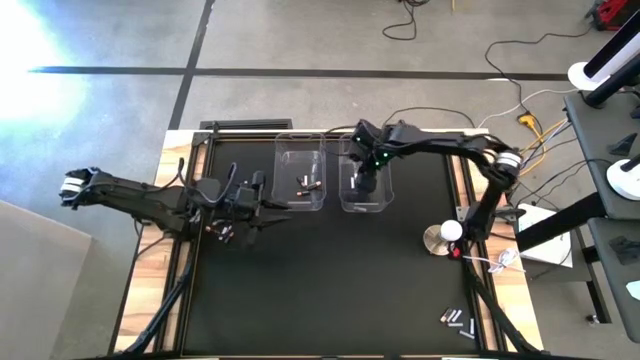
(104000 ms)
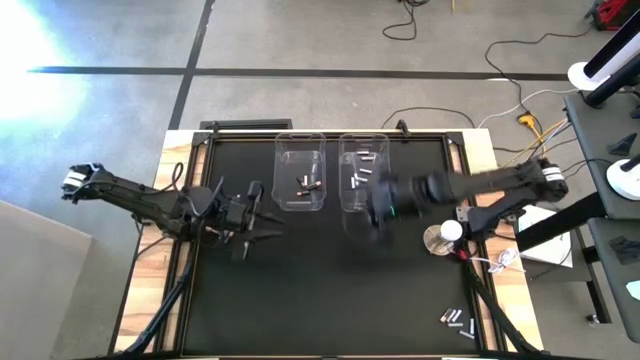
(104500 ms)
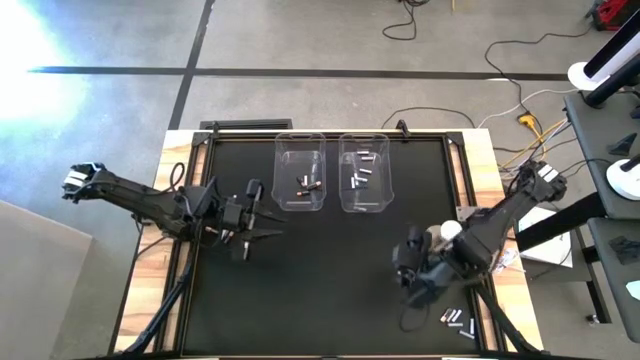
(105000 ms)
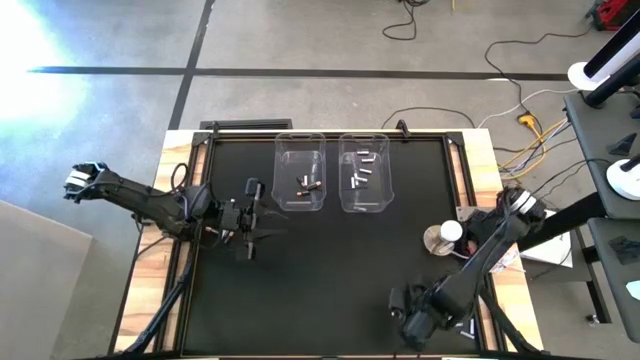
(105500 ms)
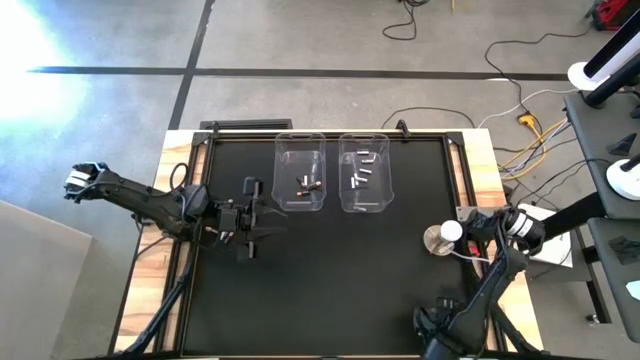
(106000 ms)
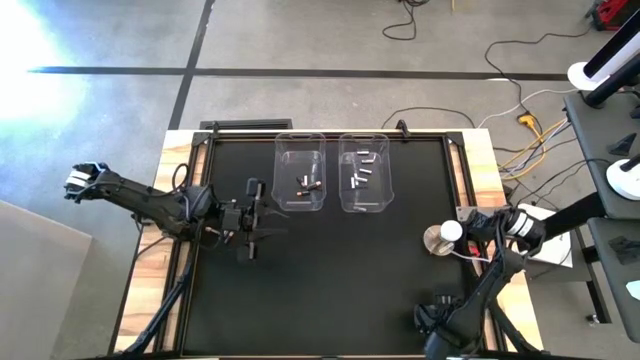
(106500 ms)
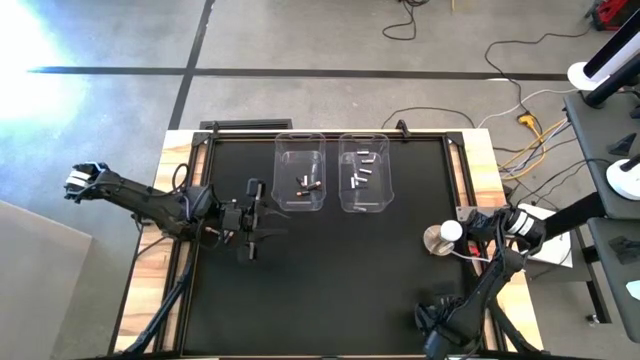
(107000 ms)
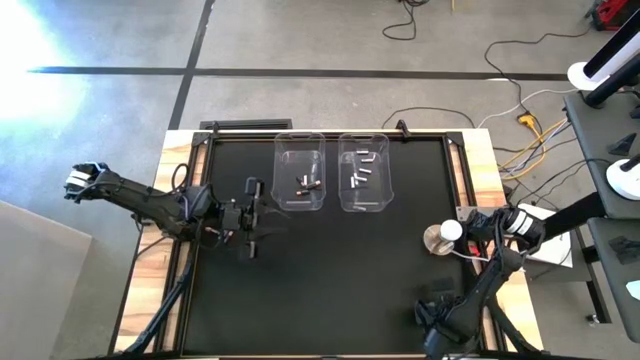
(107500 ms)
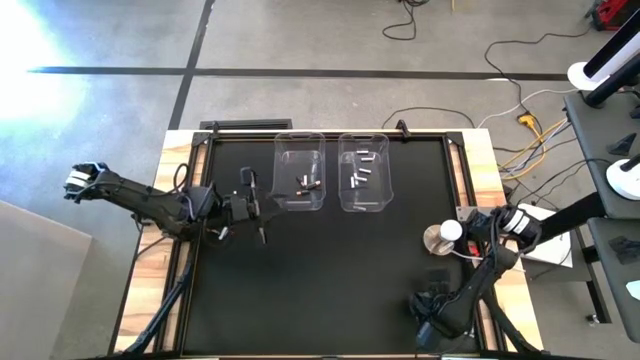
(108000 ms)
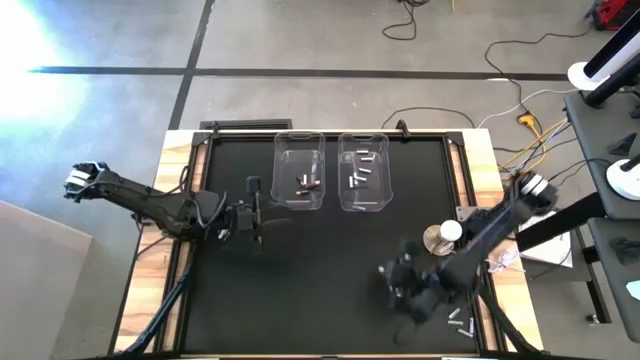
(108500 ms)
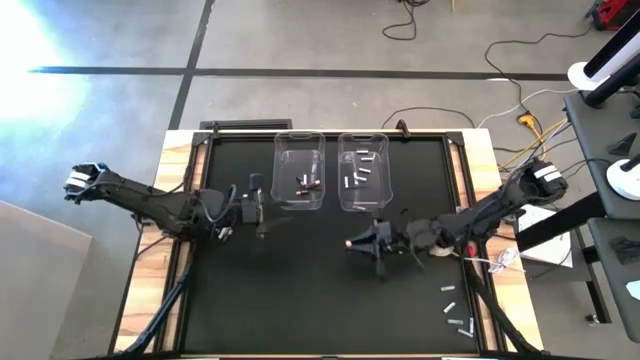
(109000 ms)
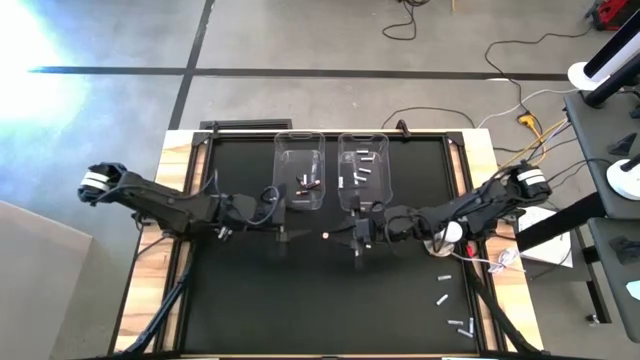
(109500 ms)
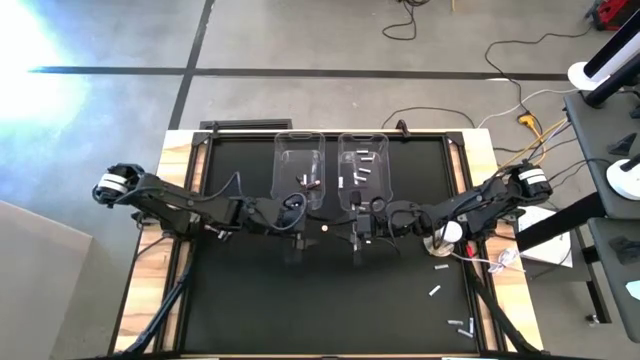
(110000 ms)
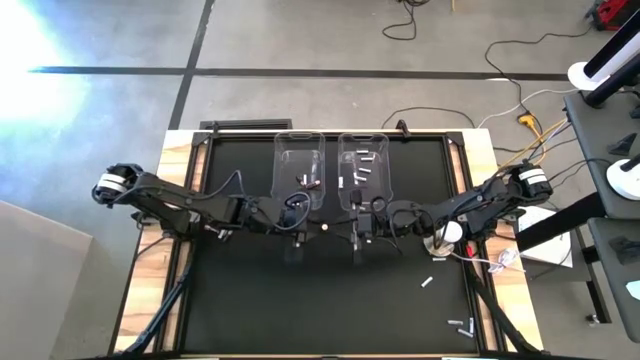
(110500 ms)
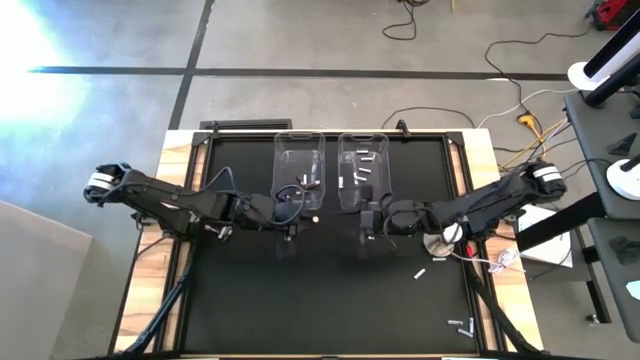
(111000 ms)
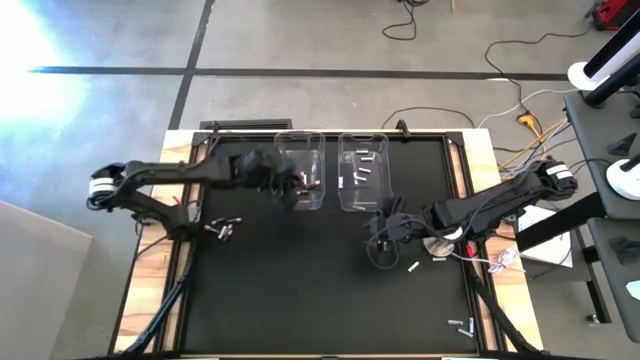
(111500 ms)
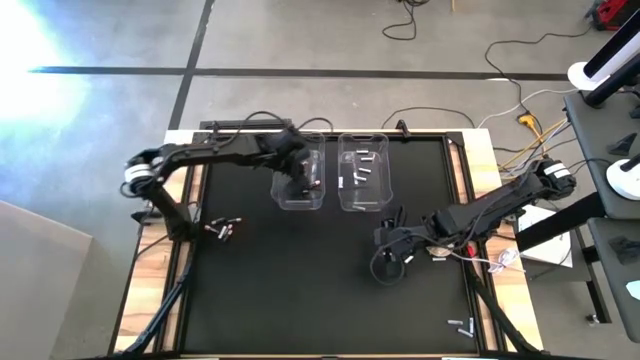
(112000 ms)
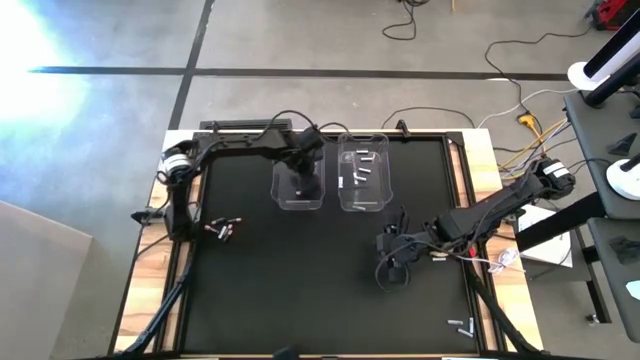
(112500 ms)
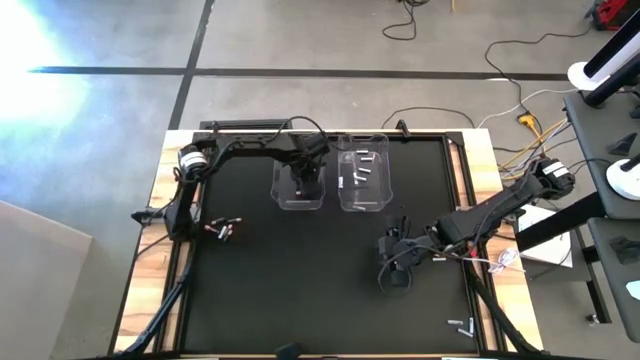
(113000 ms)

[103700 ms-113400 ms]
Task: Sort batteries
Put the black battery into the left transparent bin

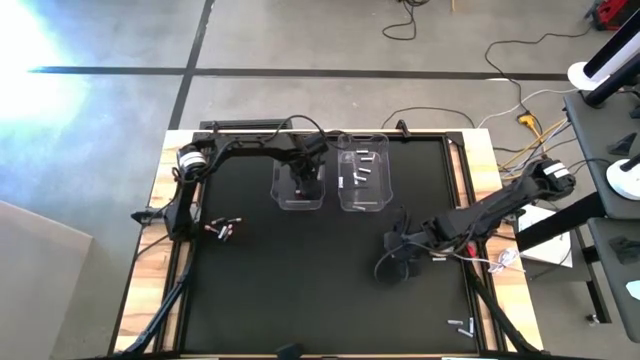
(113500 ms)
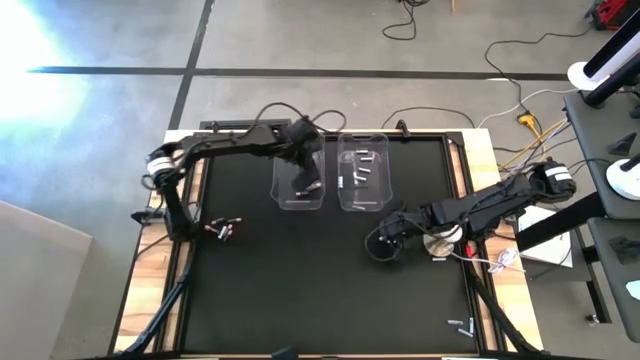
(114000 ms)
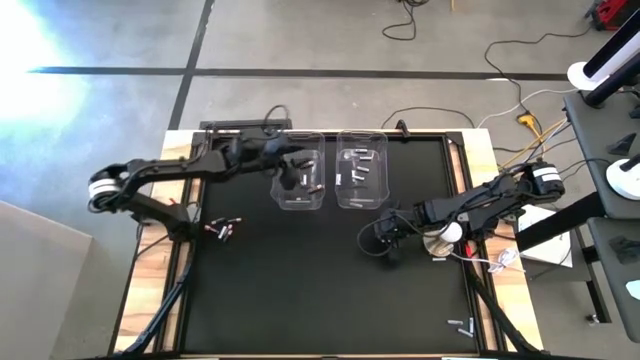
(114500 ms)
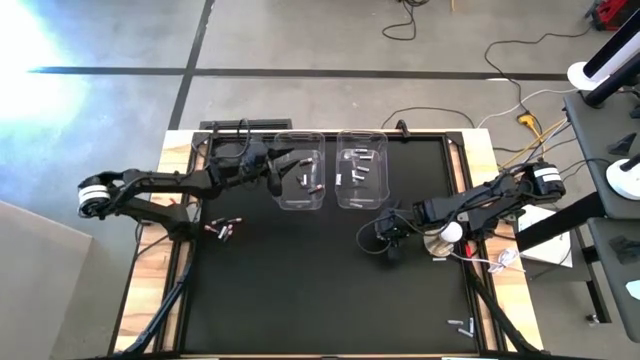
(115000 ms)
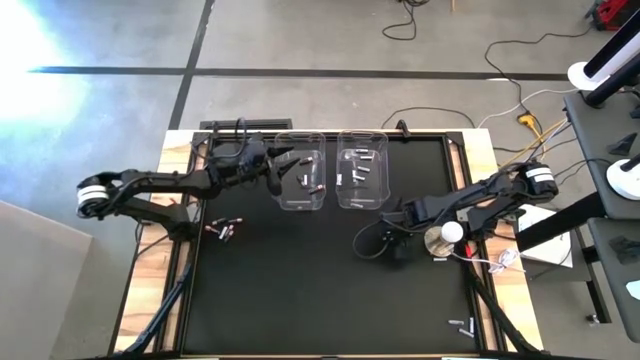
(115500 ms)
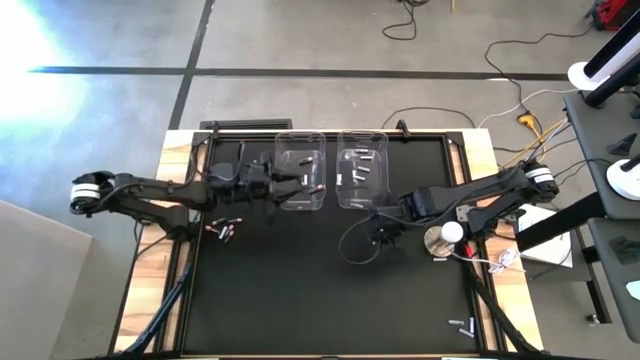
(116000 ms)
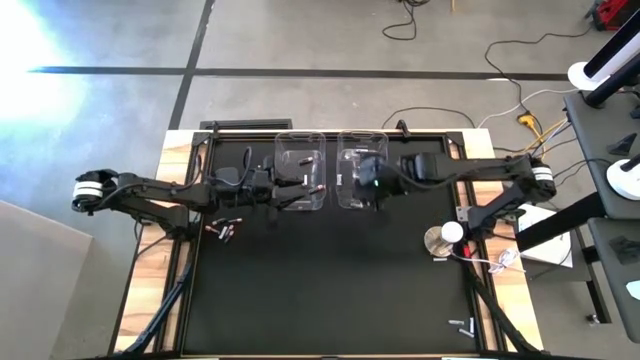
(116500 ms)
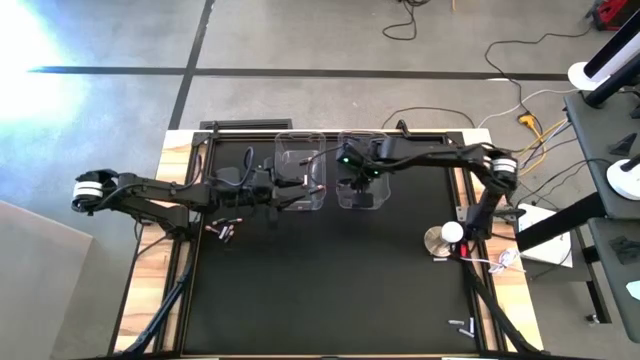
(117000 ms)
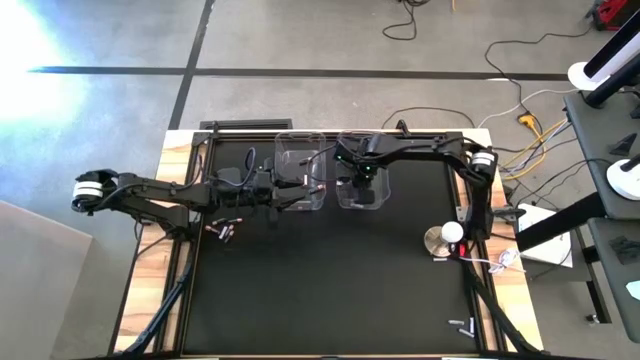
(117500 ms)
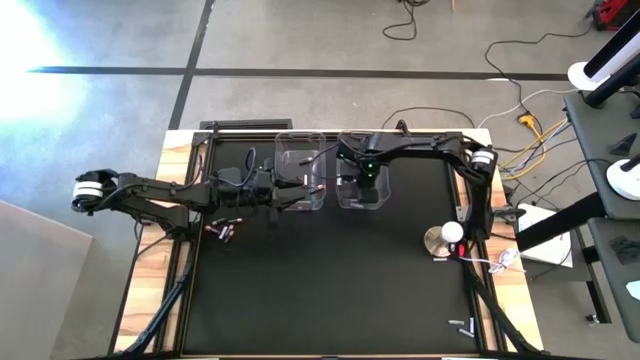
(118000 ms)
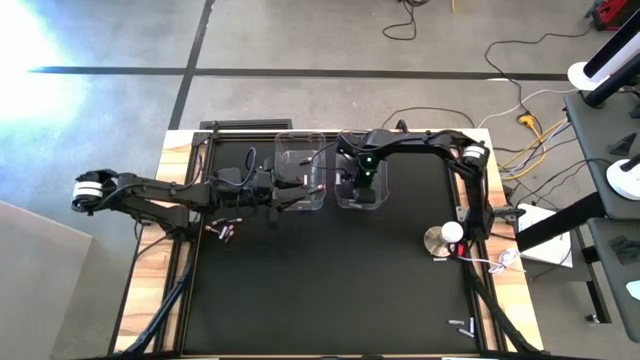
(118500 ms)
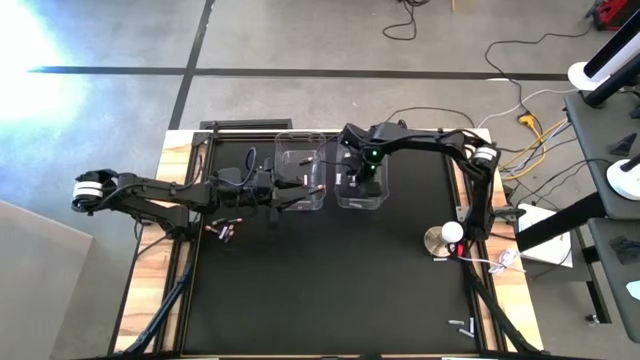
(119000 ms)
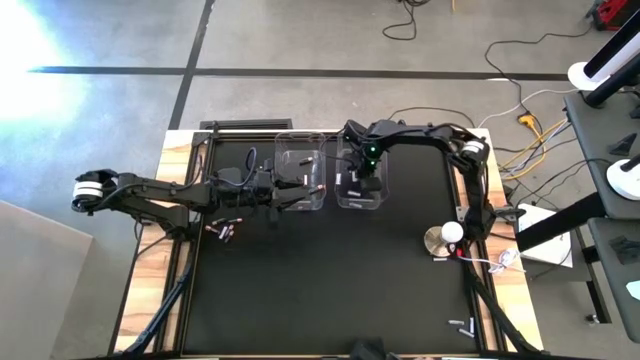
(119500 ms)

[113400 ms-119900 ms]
Put the white battery into the right transparent bin

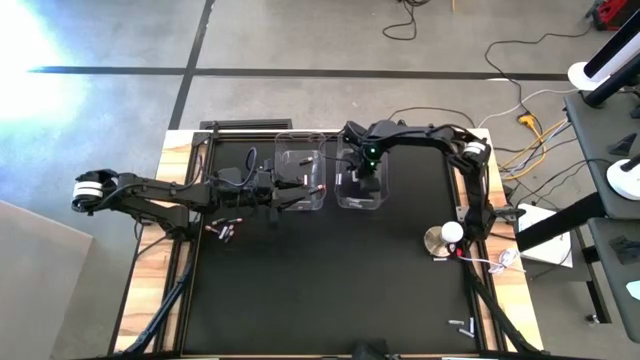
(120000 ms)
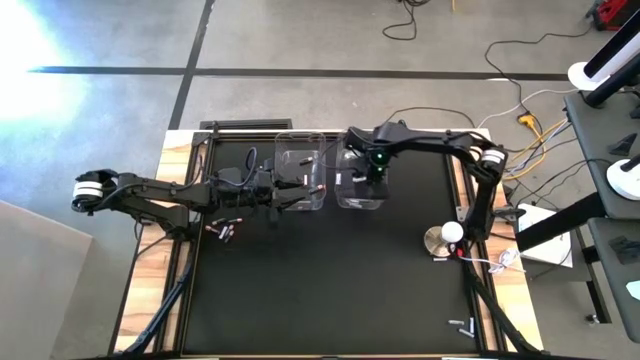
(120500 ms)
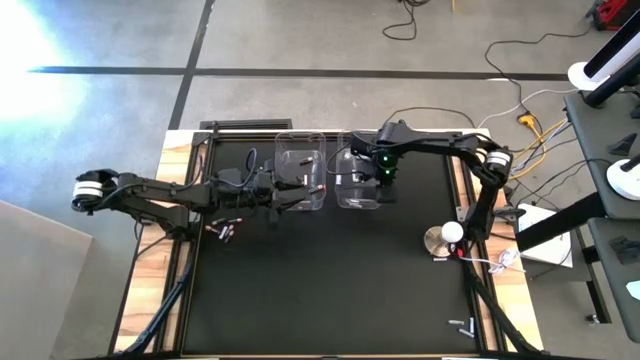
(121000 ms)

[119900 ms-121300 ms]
Adjust the right transparent bin

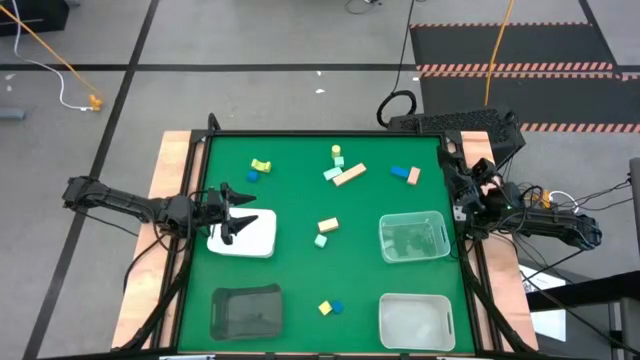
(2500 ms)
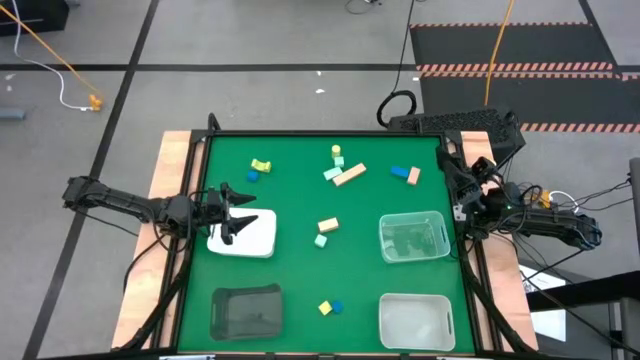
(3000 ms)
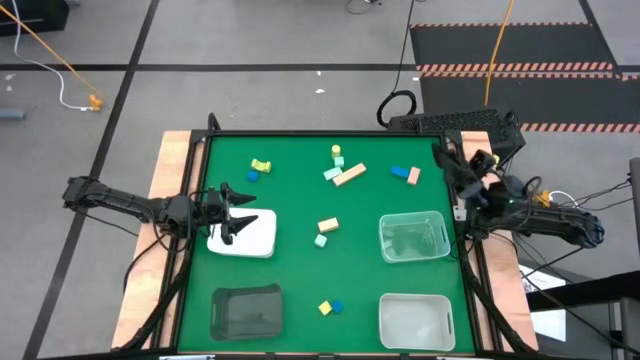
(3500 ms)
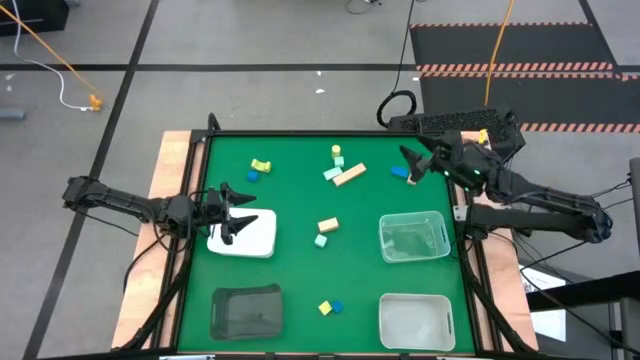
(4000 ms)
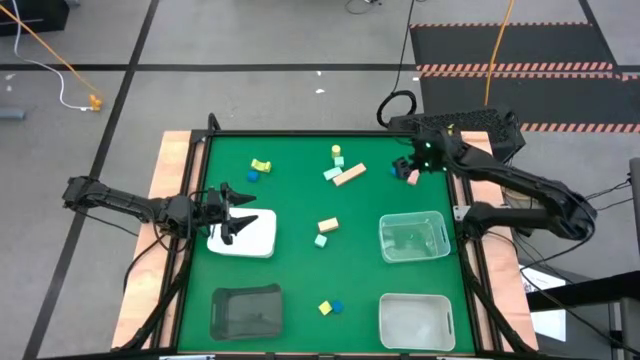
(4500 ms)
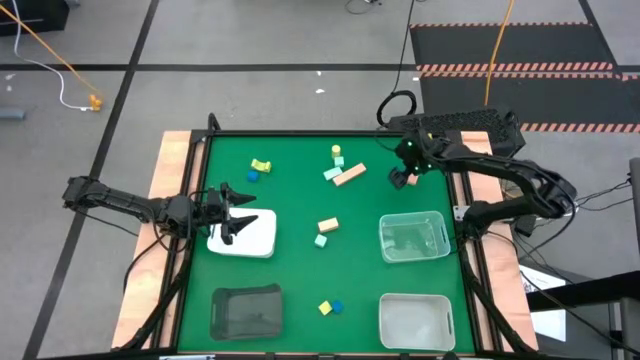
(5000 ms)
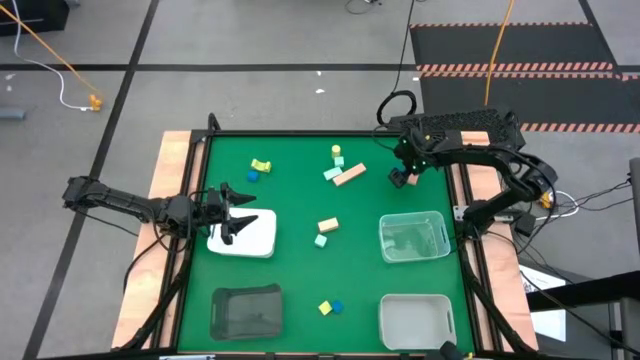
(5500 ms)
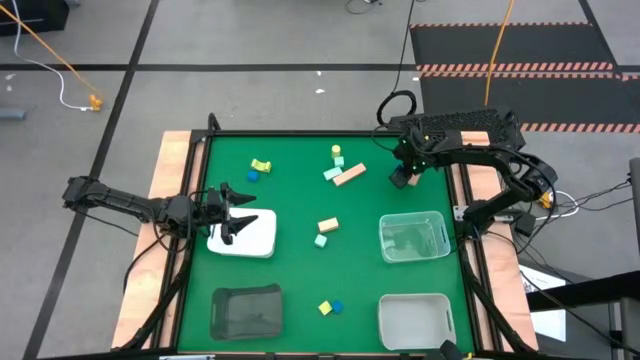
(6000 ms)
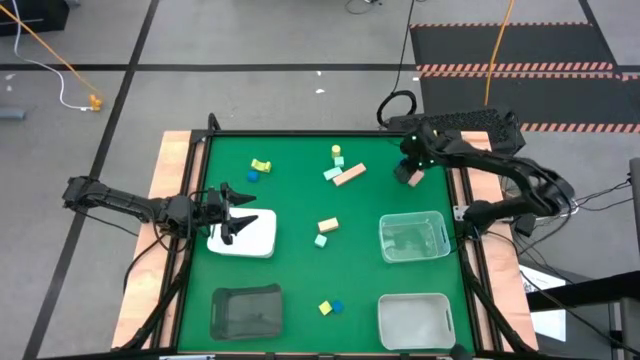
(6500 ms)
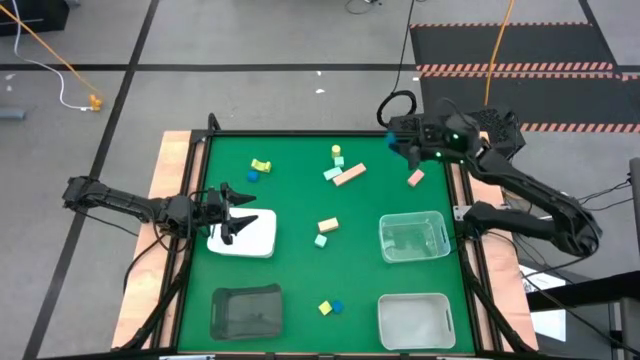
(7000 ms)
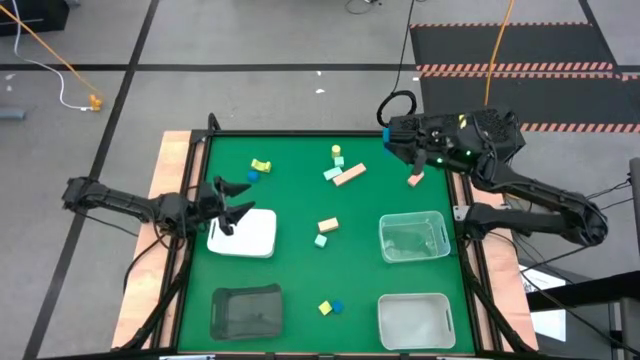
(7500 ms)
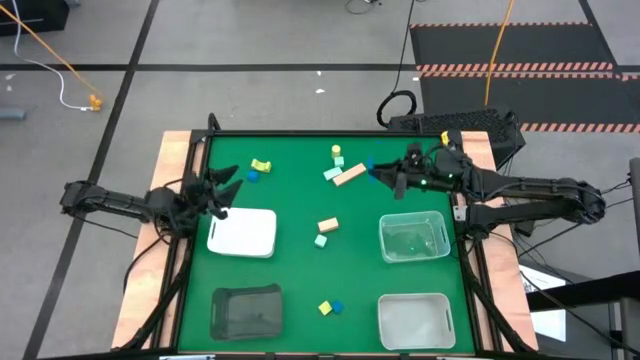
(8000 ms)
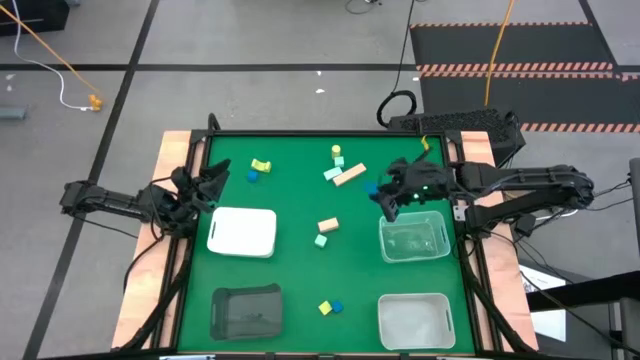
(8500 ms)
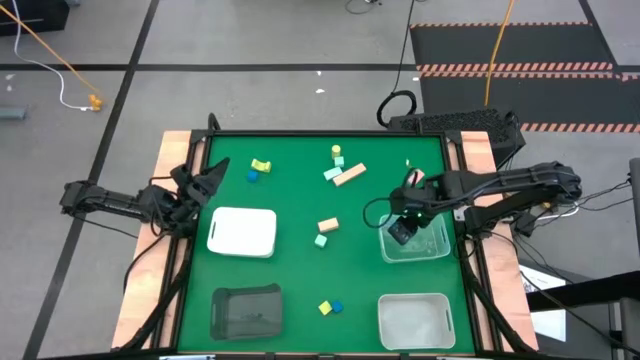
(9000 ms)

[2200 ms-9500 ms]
Task: Sort & place blocks by color
Put the top right blue block into the transparent bin
